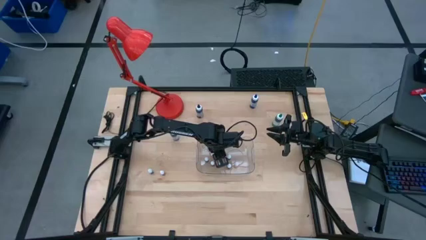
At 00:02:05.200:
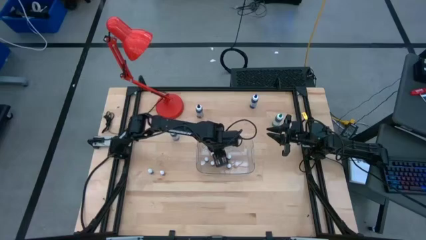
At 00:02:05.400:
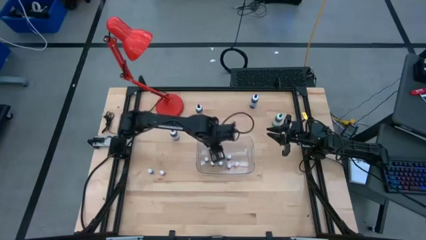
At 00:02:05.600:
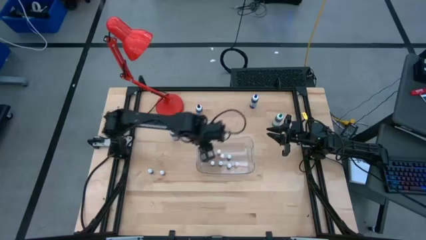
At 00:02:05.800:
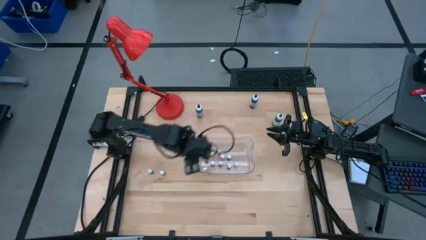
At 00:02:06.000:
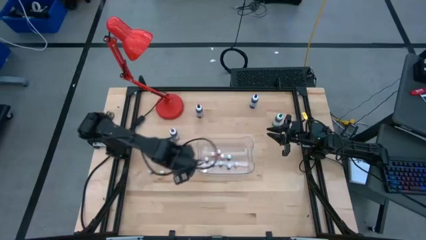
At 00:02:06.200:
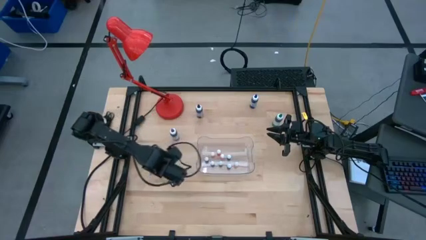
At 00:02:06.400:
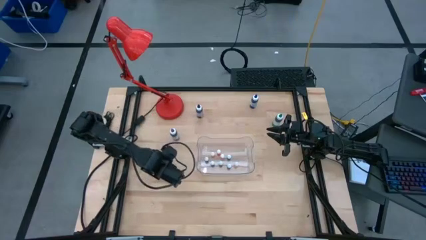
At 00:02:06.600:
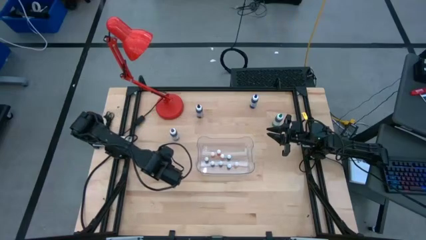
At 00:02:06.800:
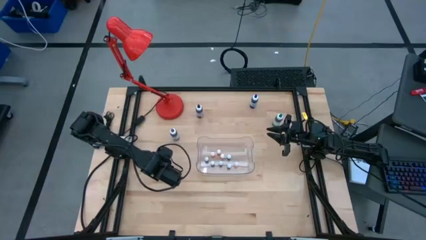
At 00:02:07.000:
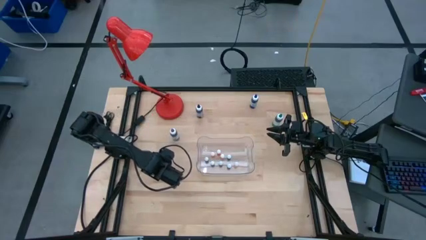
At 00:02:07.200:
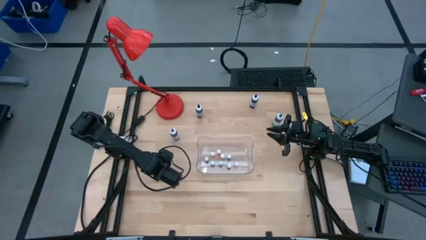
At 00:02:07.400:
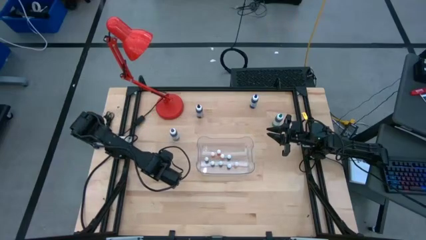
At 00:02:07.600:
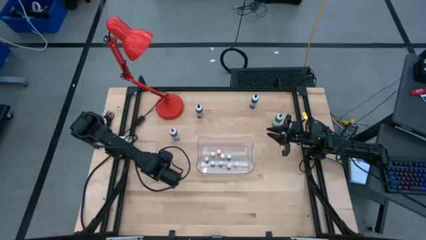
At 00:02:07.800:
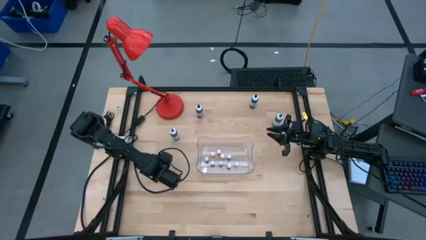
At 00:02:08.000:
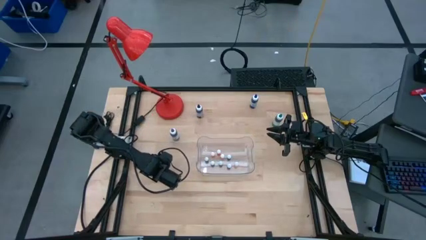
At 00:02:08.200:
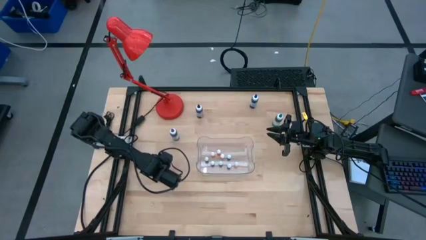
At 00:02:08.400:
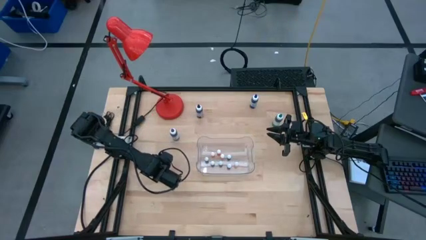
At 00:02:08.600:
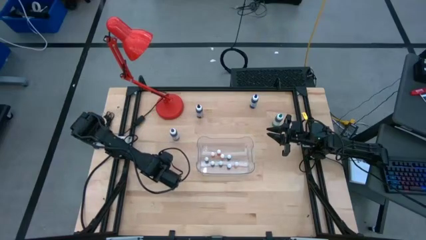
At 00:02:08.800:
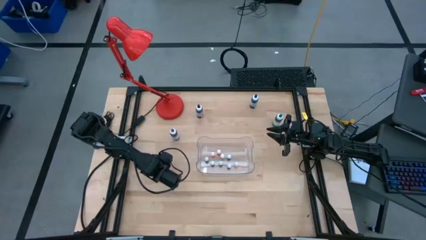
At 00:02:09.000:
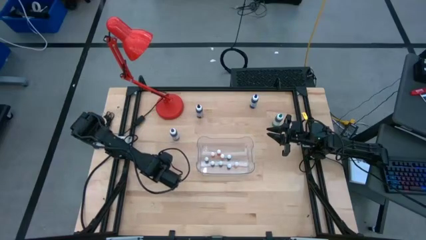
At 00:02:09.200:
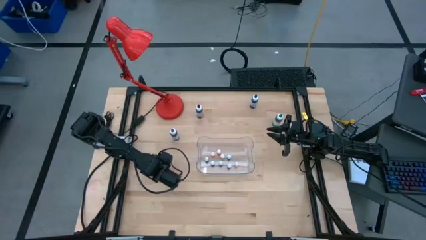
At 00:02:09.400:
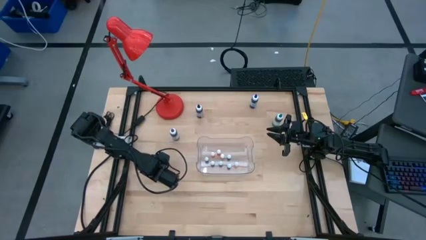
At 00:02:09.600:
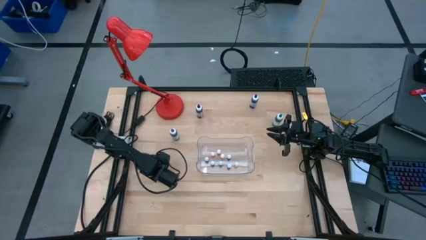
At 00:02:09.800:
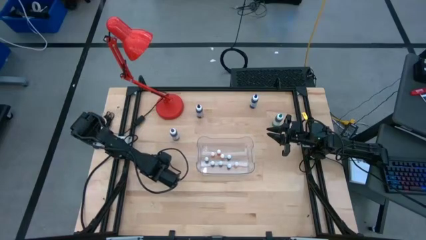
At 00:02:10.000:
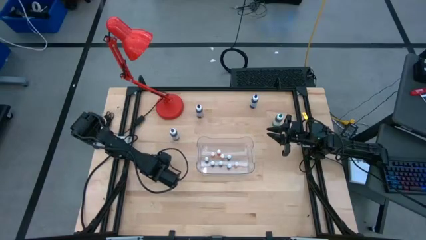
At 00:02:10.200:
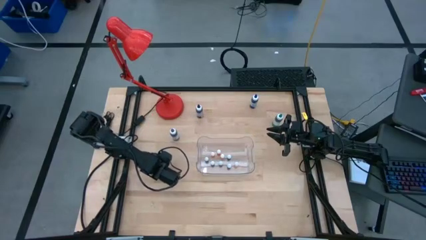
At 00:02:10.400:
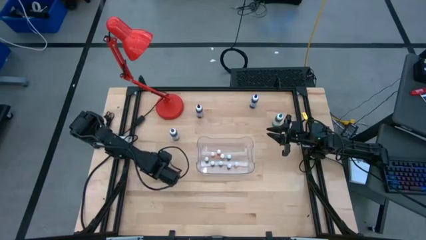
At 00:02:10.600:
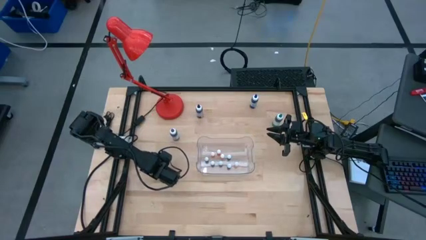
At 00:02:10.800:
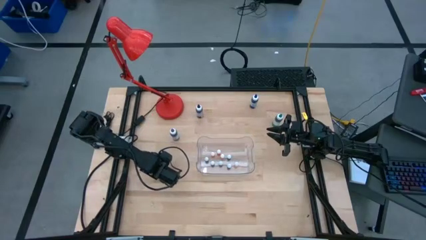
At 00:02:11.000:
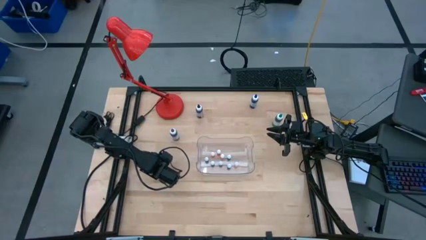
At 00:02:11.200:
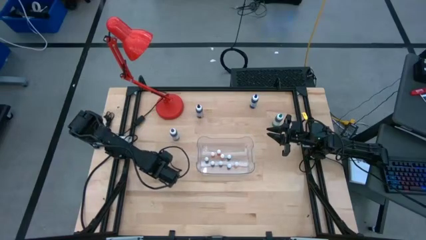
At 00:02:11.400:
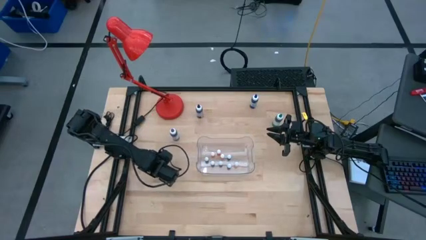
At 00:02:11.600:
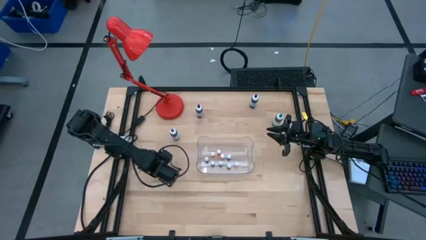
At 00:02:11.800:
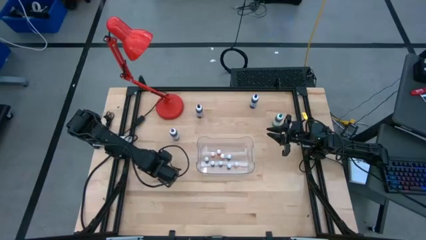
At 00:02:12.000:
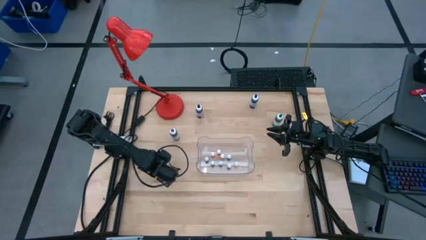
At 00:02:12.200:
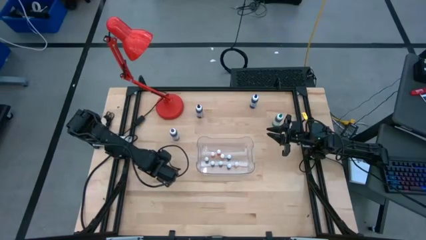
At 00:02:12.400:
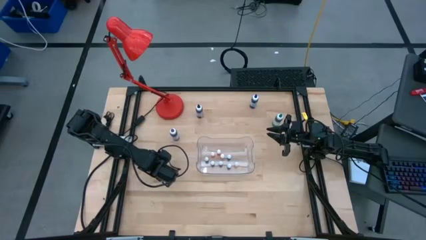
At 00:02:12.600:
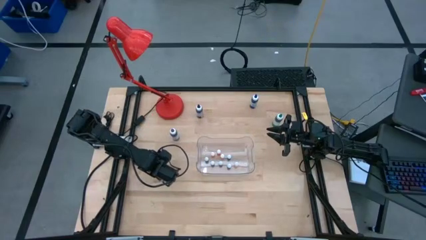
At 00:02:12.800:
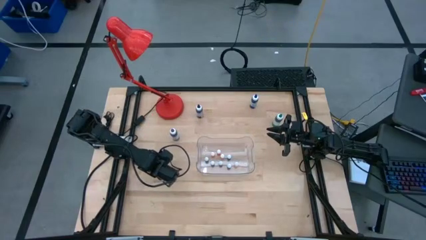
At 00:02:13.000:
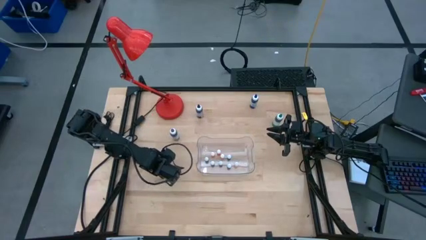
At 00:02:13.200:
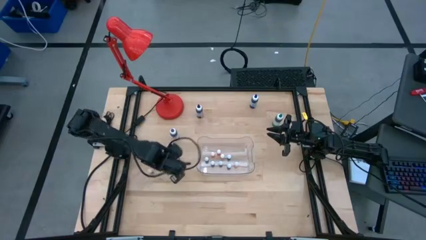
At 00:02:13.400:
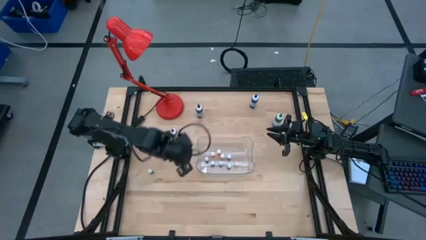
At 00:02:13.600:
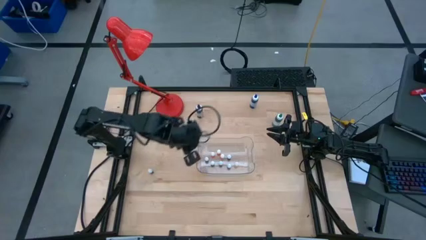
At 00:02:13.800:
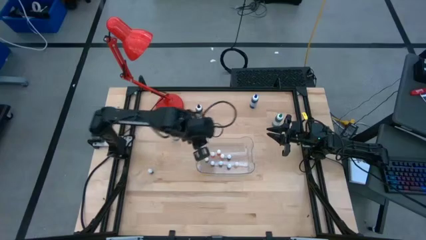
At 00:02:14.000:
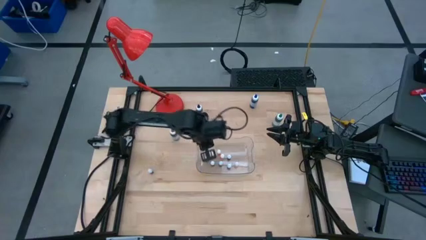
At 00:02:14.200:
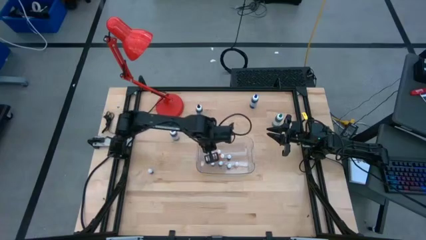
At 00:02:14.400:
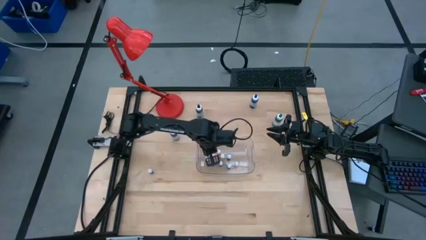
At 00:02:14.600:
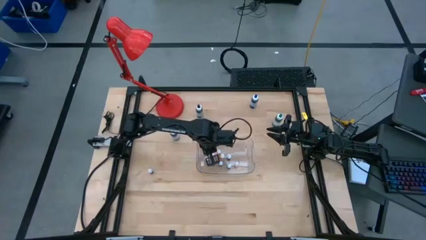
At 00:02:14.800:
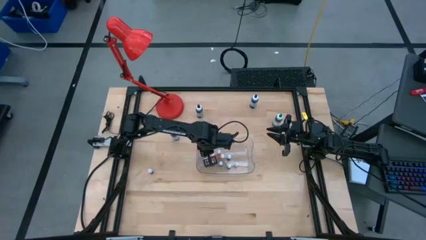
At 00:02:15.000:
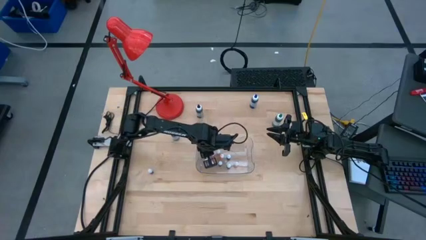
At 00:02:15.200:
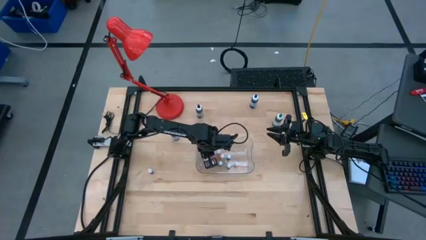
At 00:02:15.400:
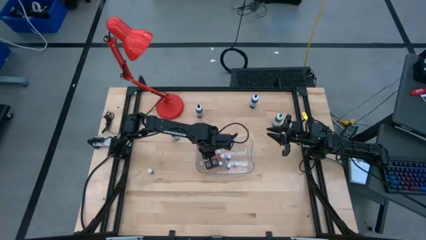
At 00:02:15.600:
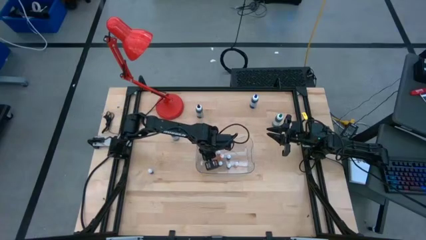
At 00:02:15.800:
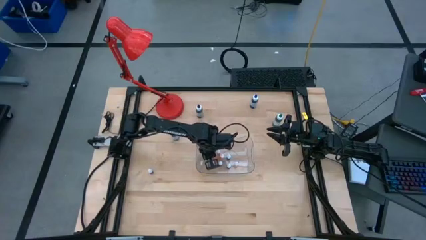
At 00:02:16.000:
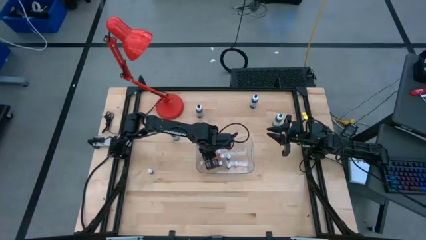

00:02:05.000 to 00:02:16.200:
Task: Pick & Place food coloring
Put the small red food coloring bottle into the transparent bin
